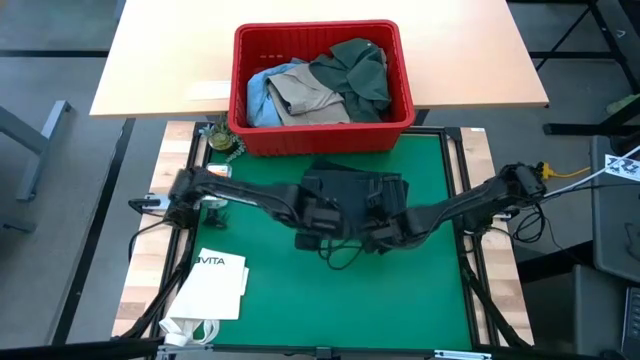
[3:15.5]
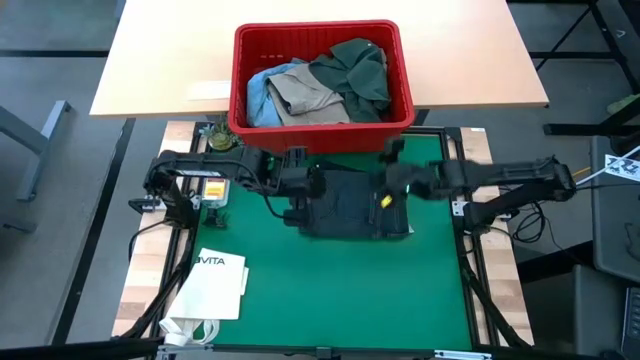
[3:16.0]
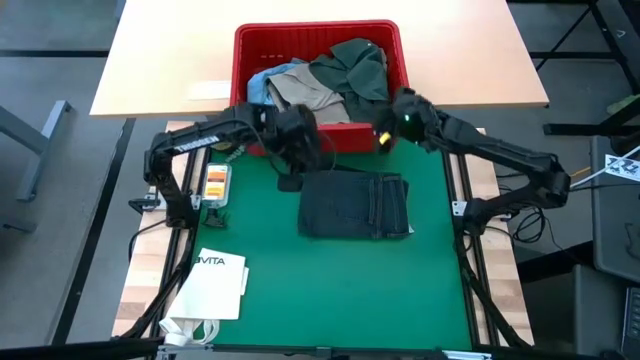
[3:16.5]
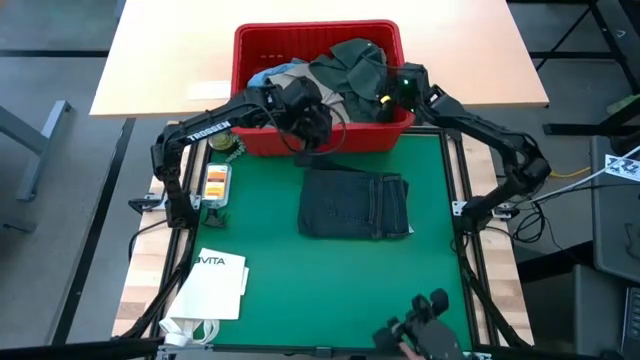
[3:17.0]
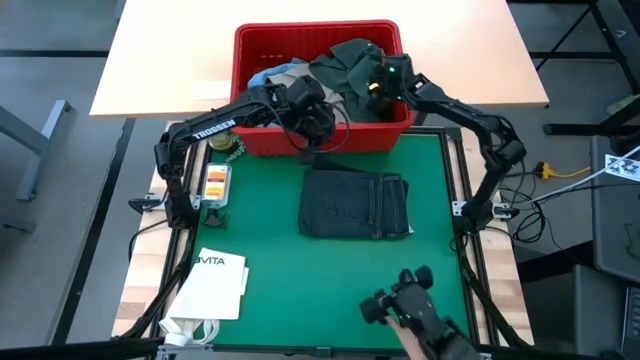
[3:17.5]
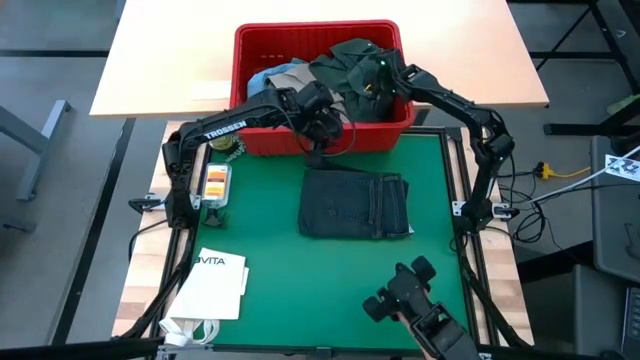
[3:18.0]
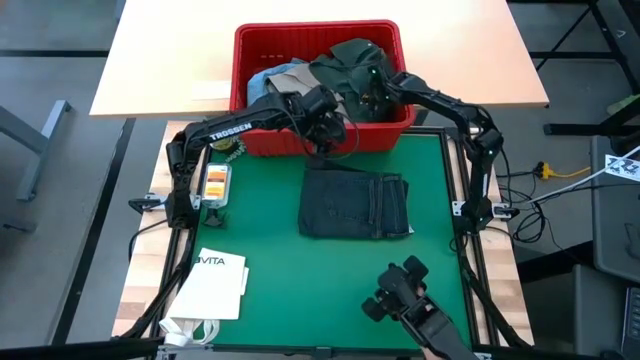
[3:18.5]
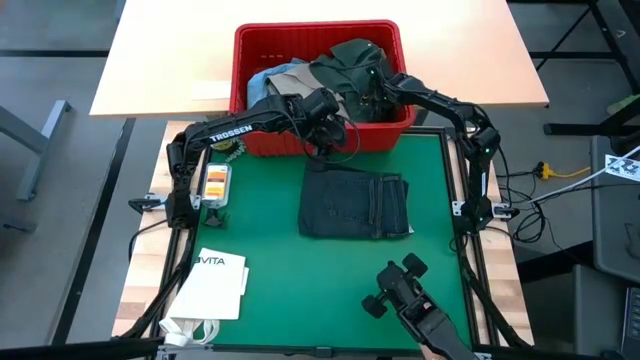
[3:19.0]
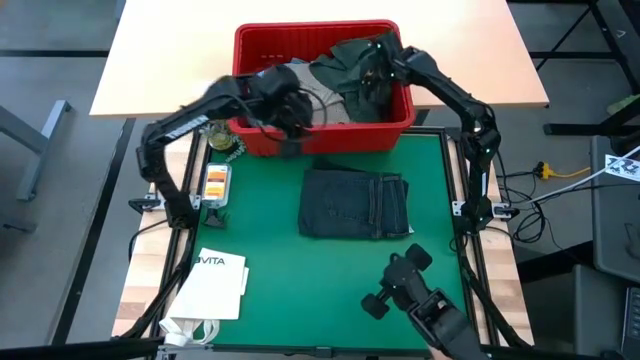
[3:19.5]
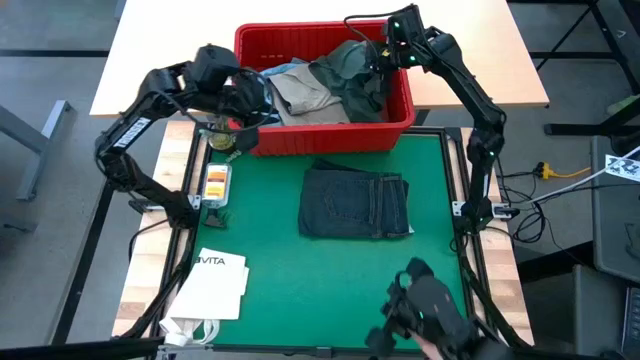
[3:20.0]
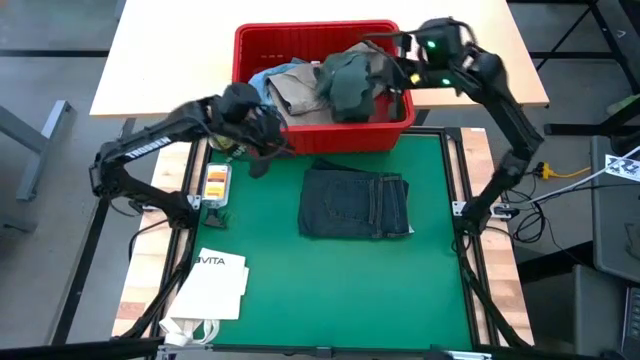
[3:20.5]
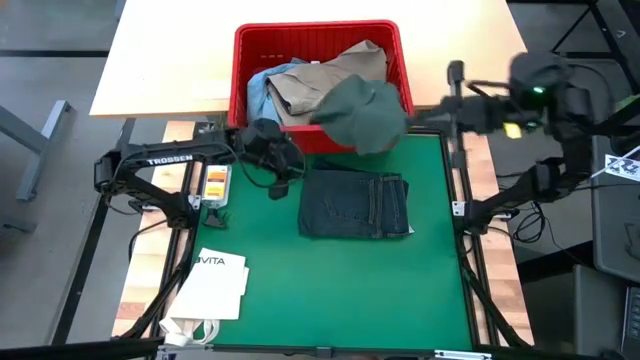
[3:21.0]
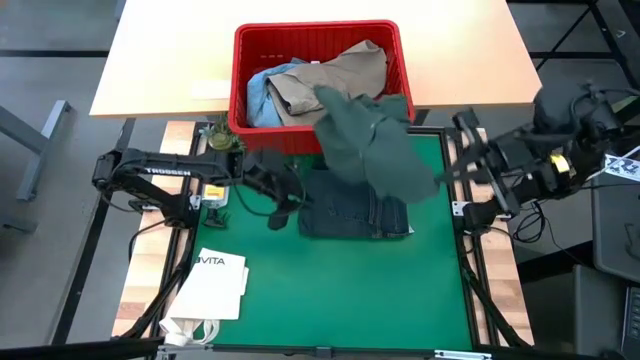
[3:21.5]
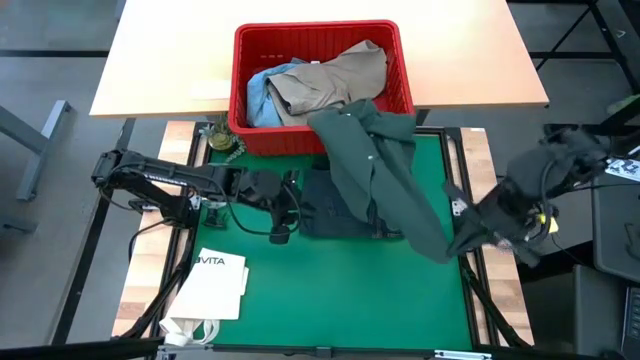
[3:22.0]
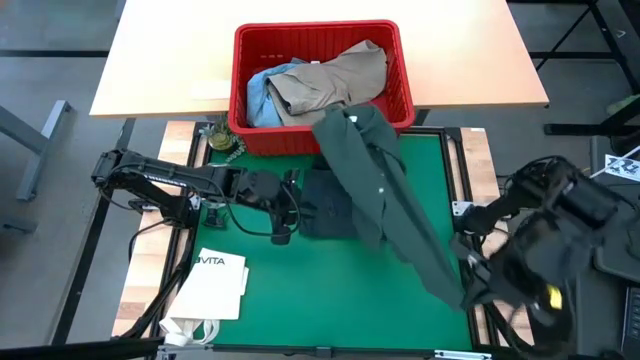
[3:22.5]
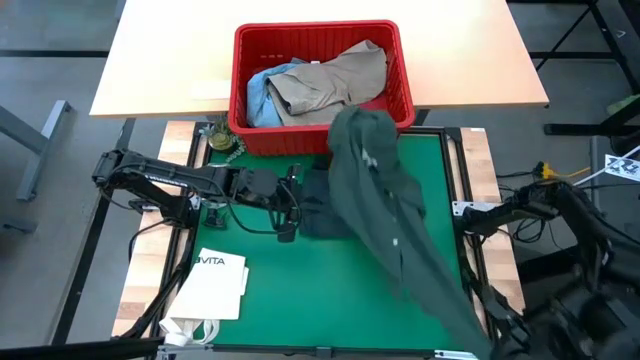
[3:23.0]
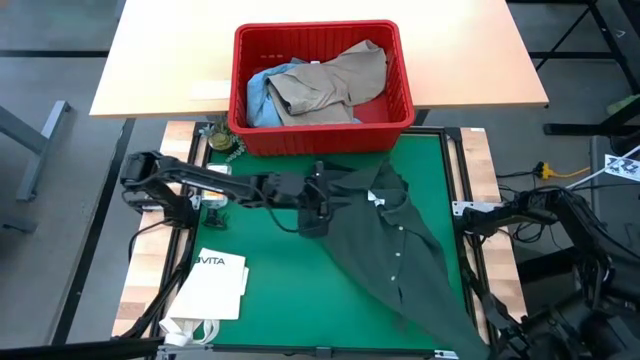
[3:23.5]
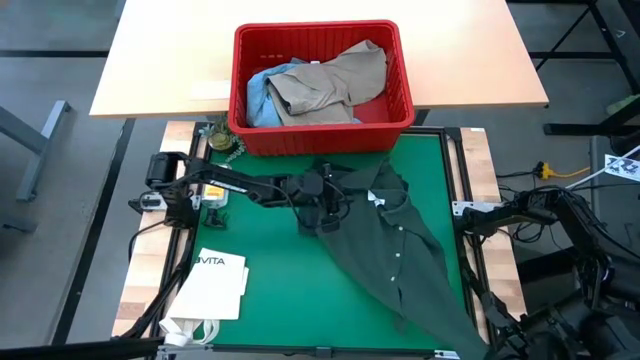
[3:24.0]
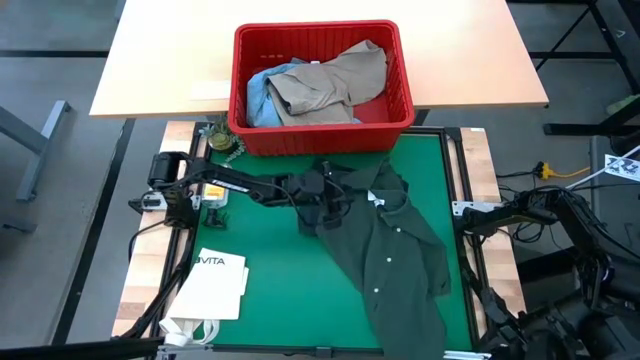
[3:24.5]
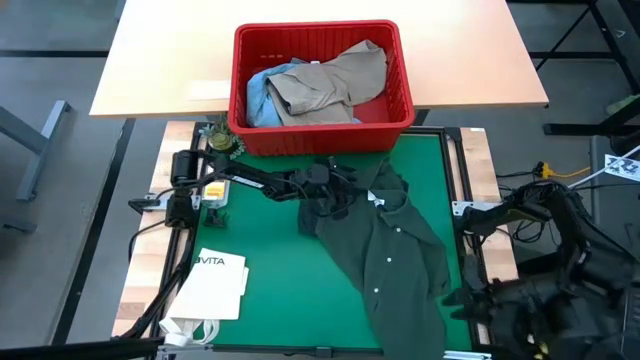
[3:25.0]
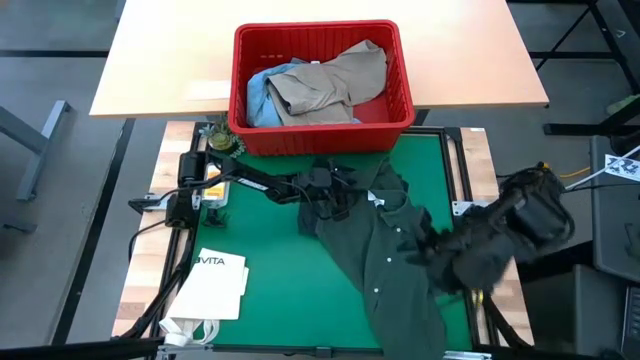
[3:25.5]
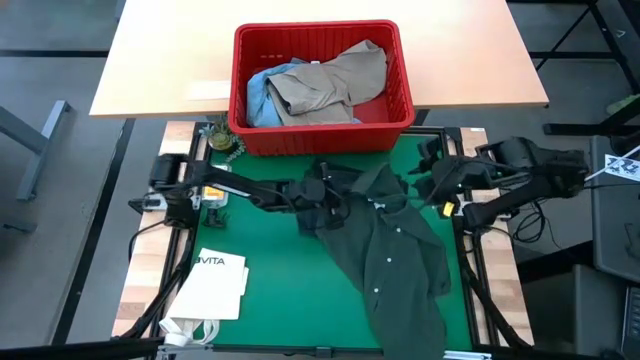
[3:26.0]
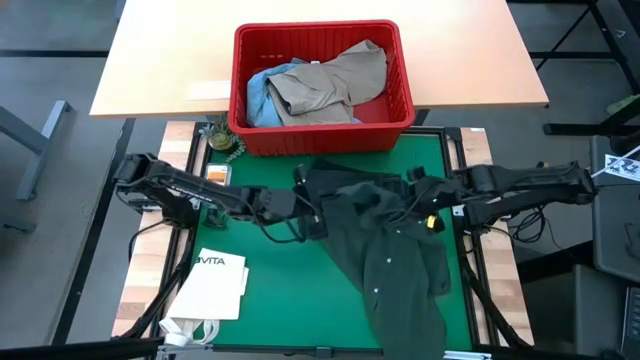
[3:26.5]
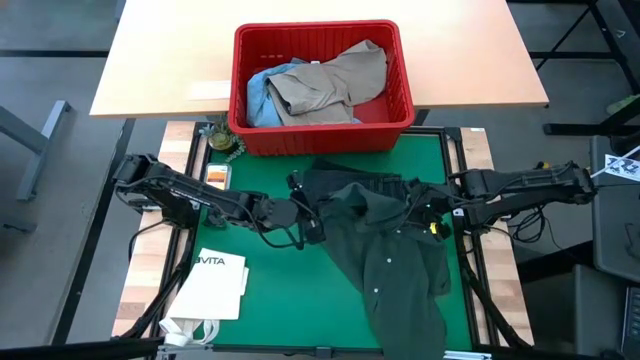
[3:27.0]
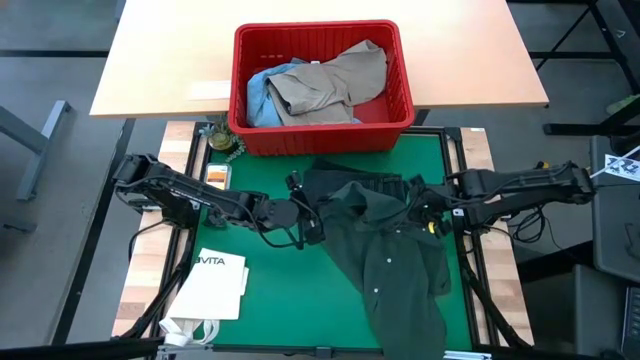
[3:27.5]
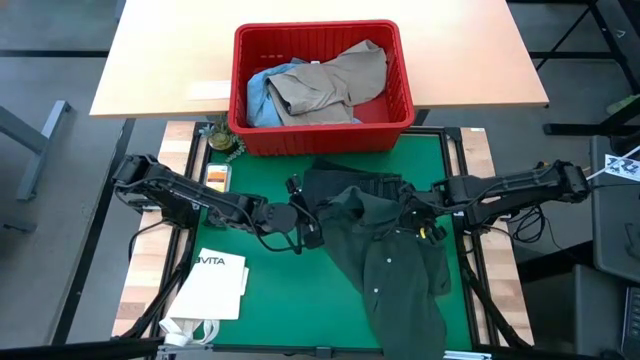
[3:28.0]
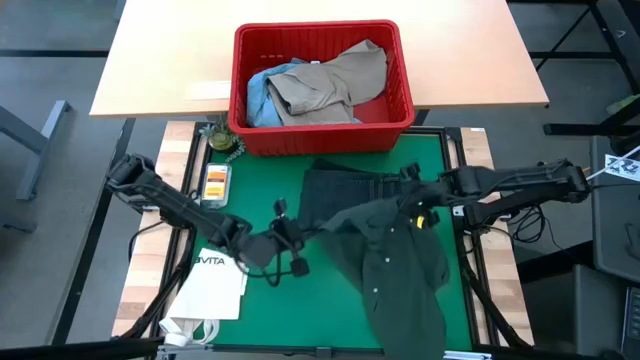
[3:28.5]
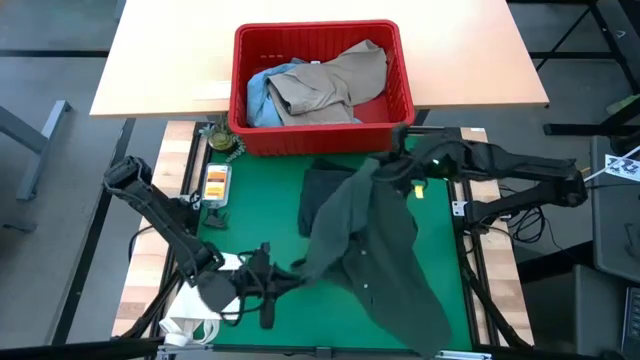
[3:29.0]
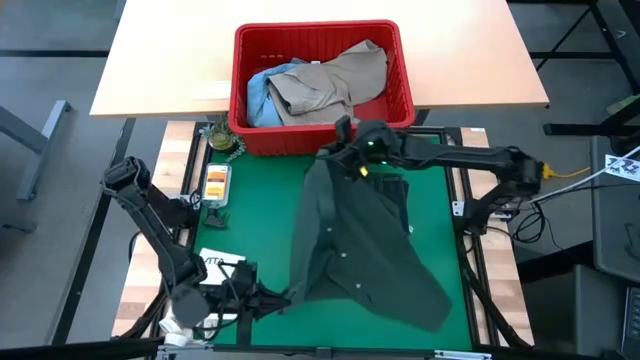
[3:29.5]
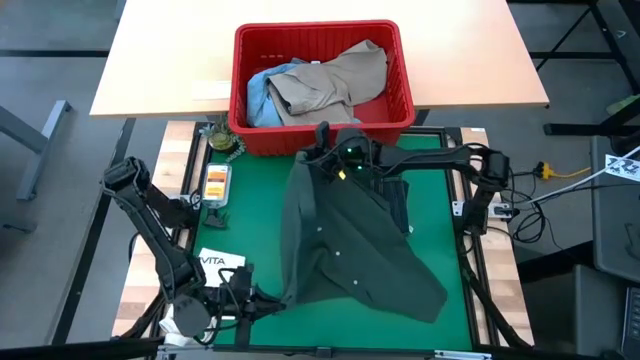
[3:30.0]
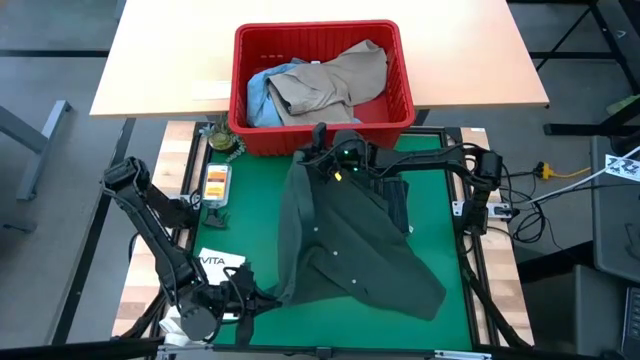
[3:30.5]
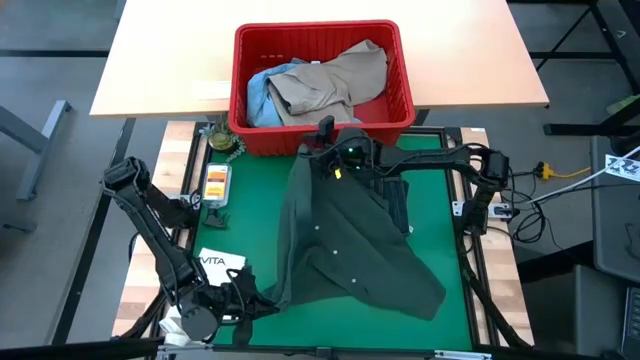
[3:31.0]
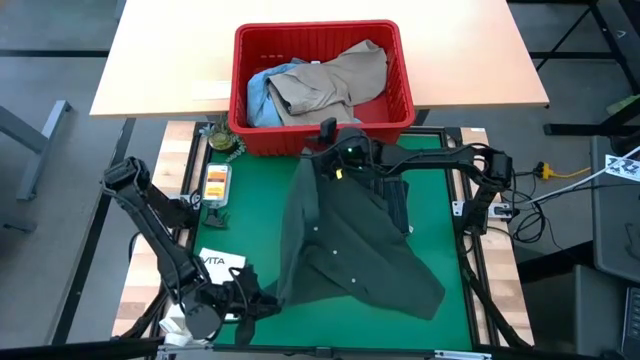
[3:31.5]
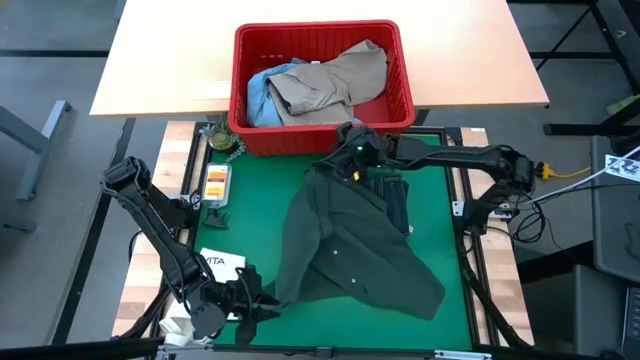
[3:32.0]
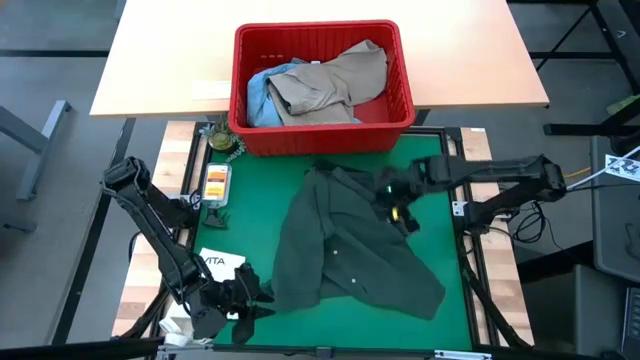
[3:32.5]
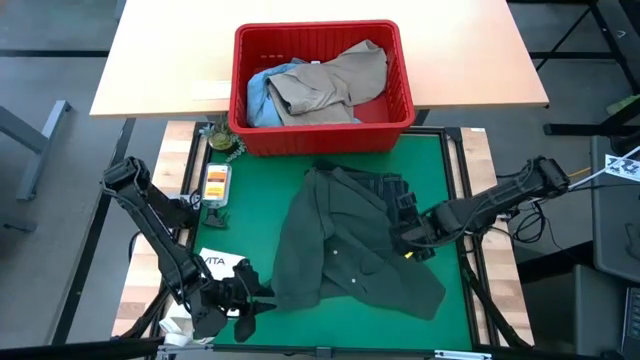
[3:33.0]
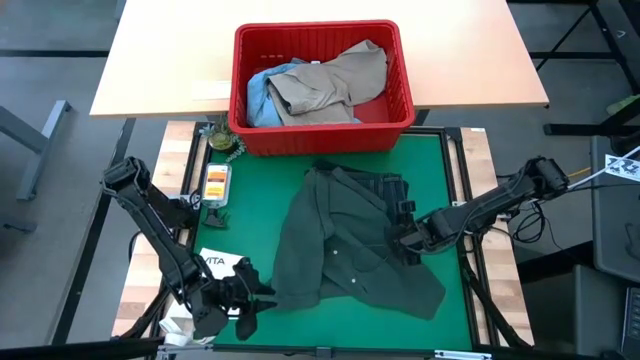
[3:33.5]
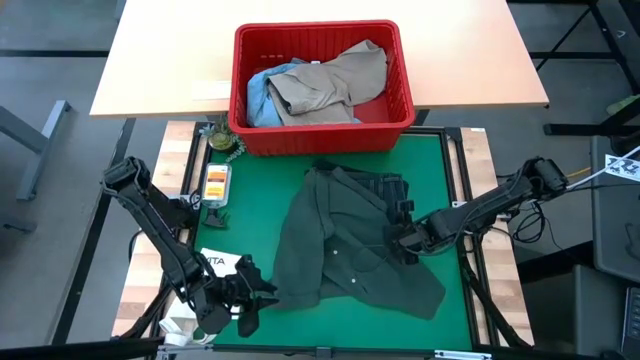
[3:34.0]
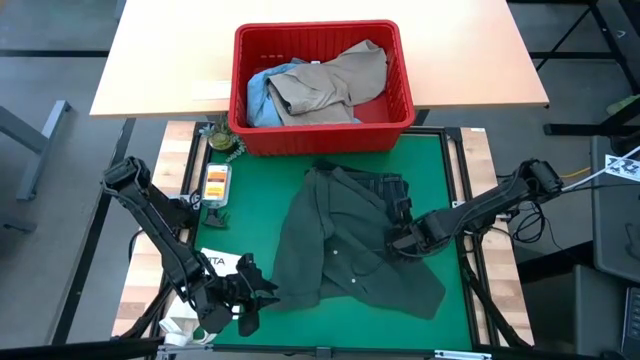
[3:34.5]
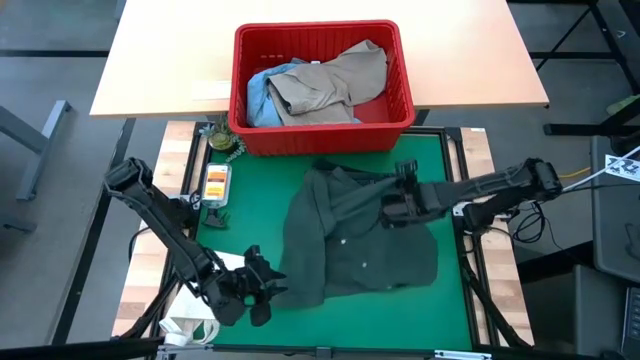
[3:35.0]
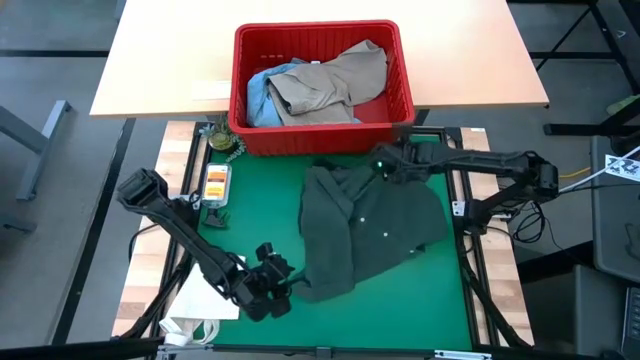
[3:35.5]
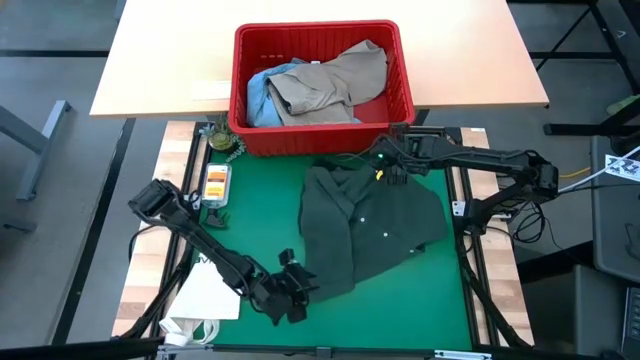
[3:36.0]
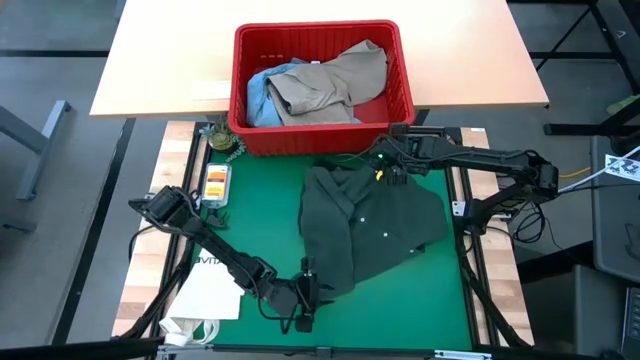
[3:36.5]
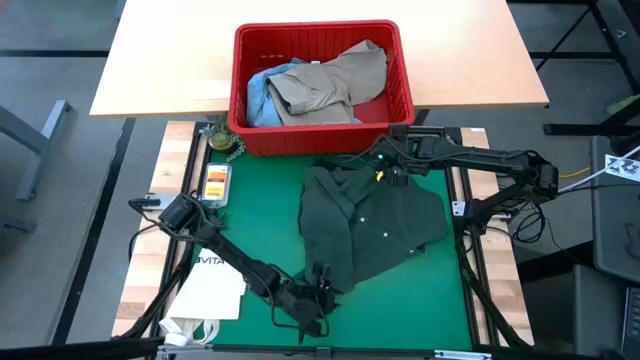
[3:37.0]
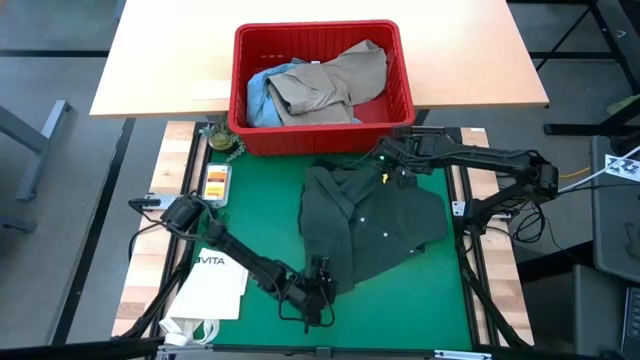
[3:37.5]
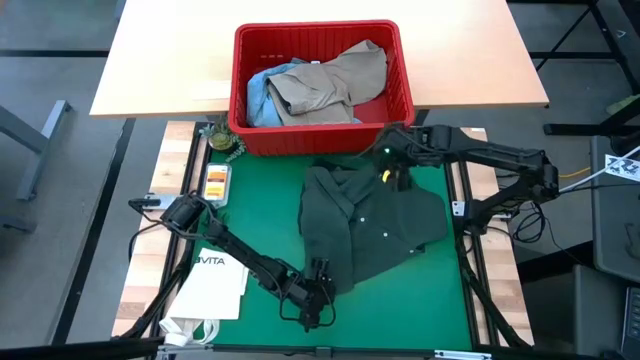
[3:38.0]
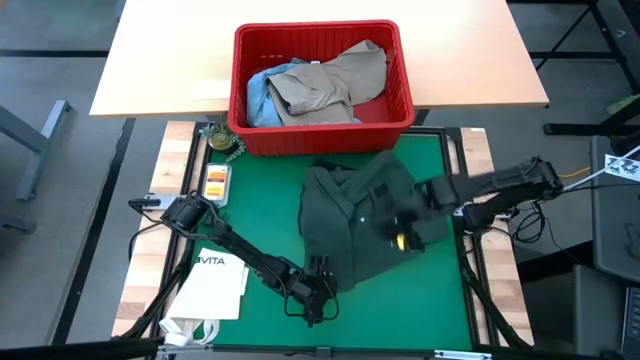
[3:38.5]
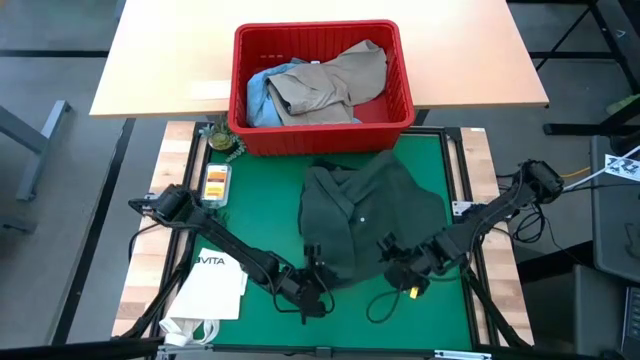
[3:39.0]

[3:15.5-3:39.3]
Task: Fold Laundry from Bin
Fold the green shirt
